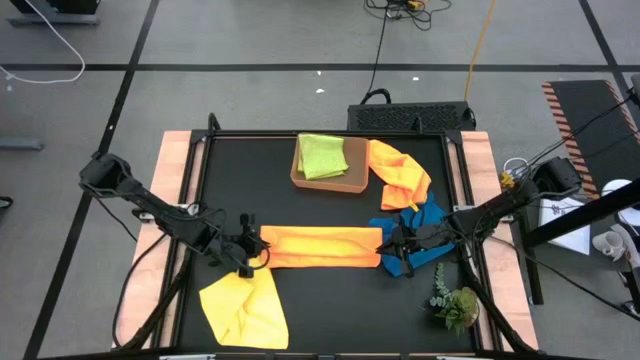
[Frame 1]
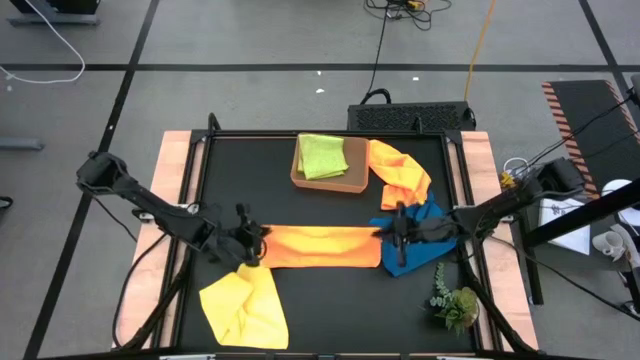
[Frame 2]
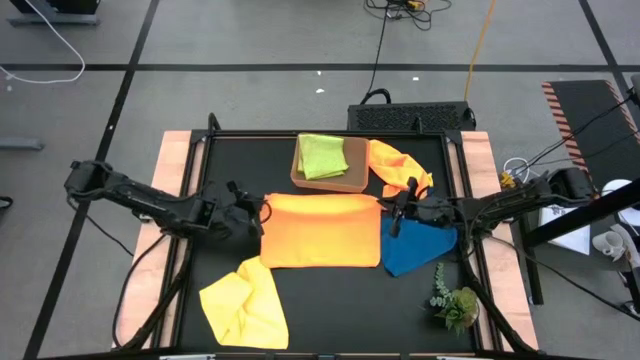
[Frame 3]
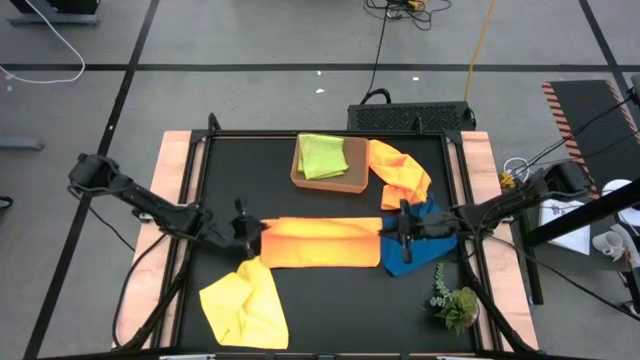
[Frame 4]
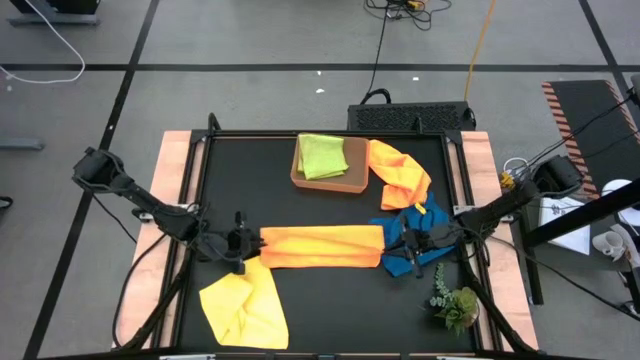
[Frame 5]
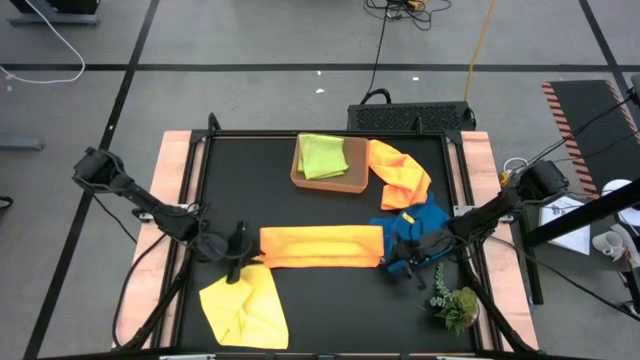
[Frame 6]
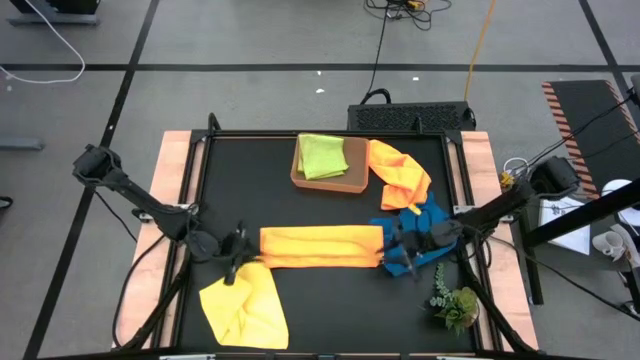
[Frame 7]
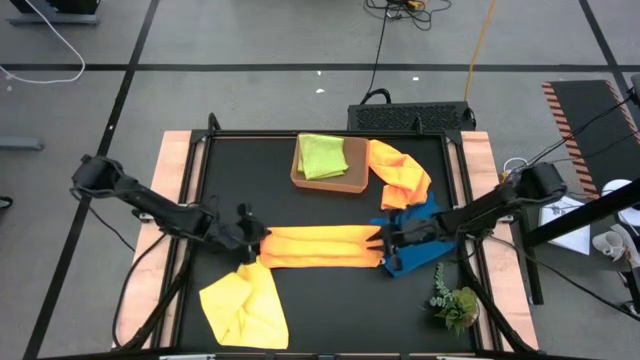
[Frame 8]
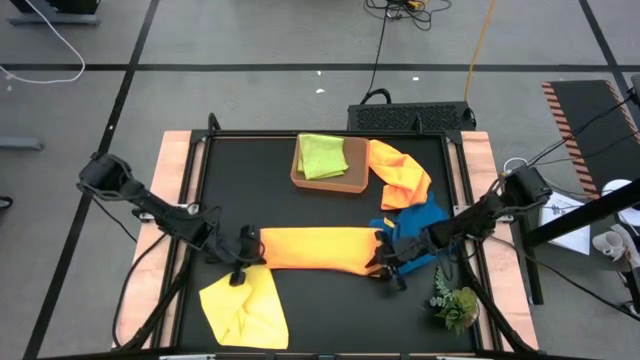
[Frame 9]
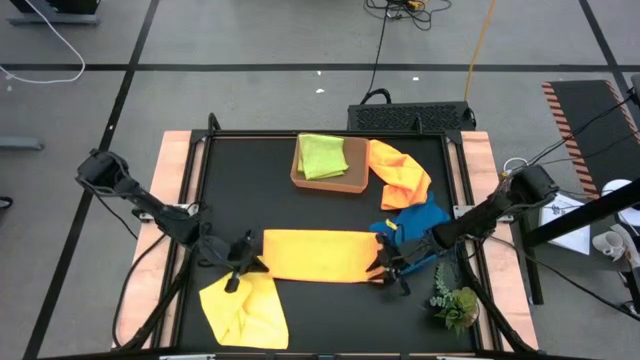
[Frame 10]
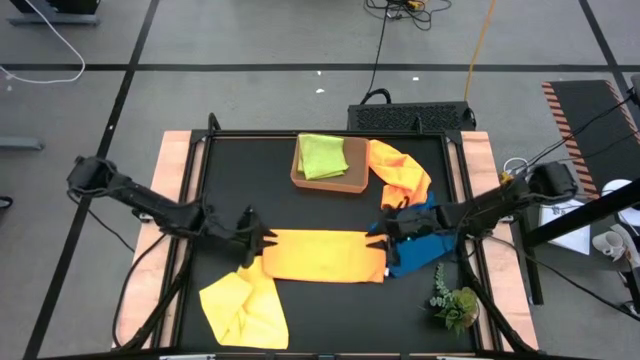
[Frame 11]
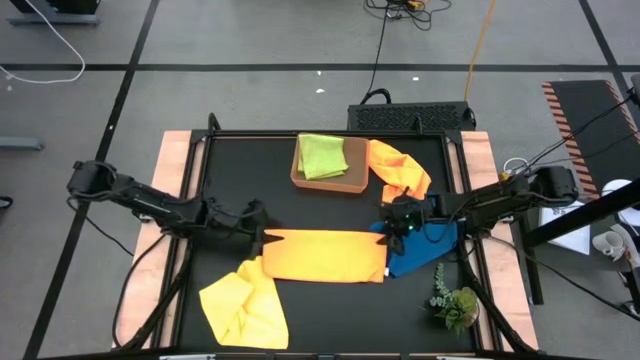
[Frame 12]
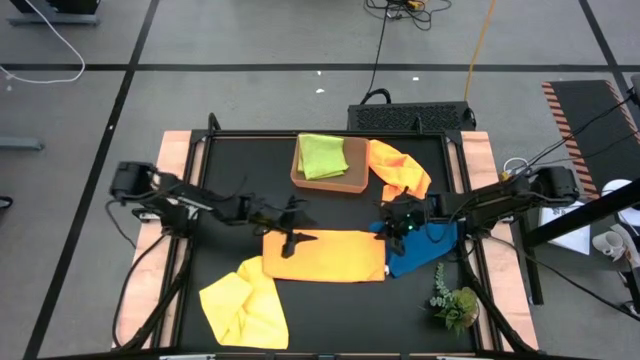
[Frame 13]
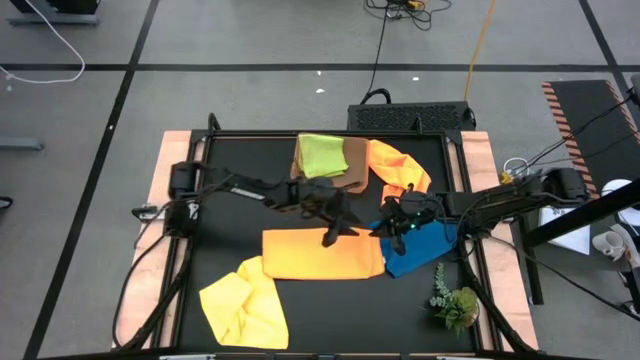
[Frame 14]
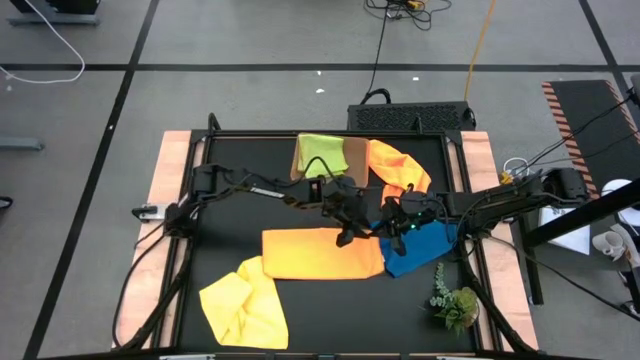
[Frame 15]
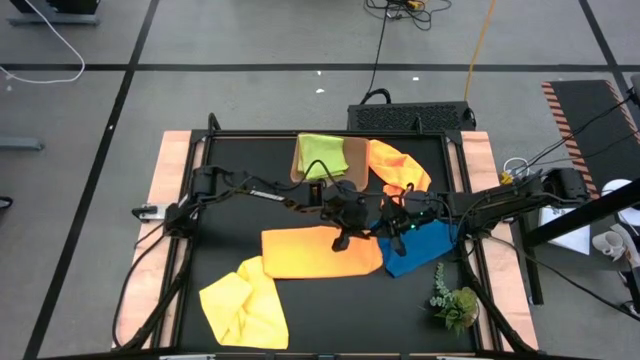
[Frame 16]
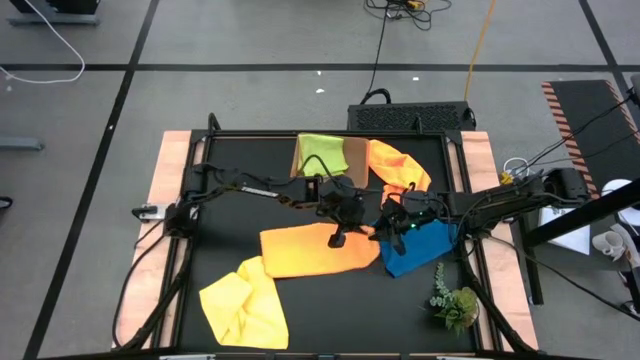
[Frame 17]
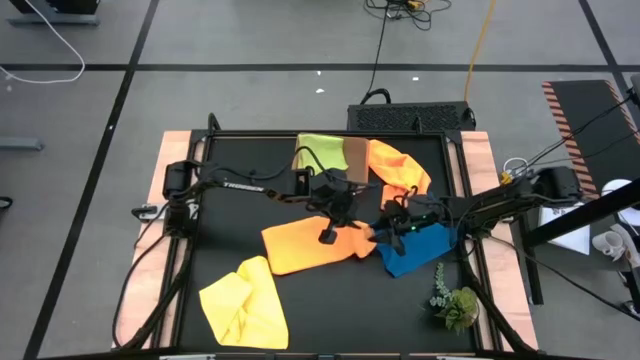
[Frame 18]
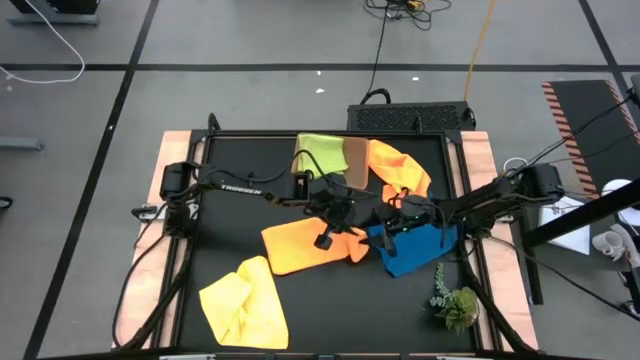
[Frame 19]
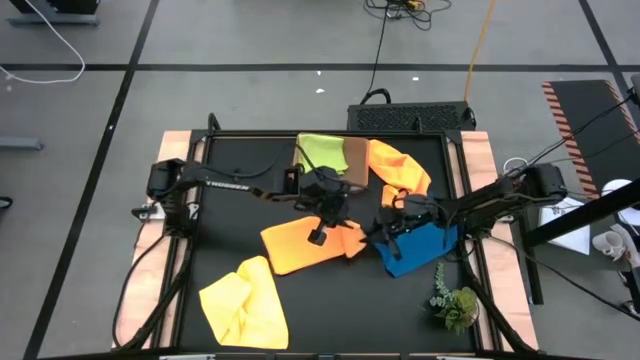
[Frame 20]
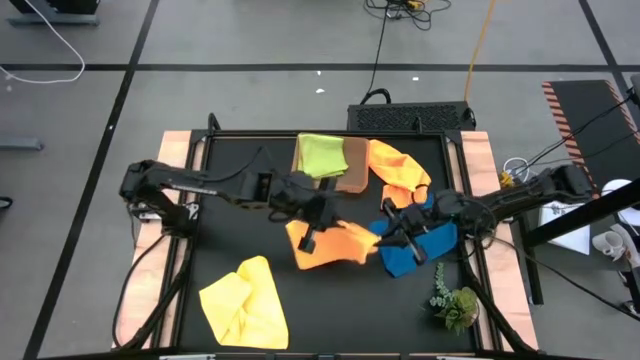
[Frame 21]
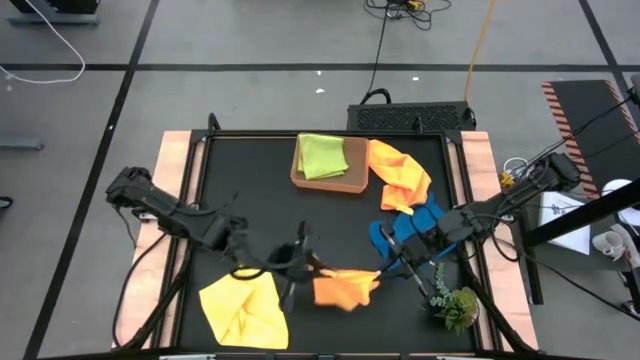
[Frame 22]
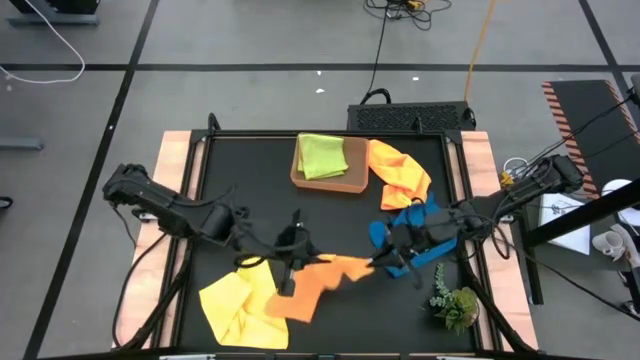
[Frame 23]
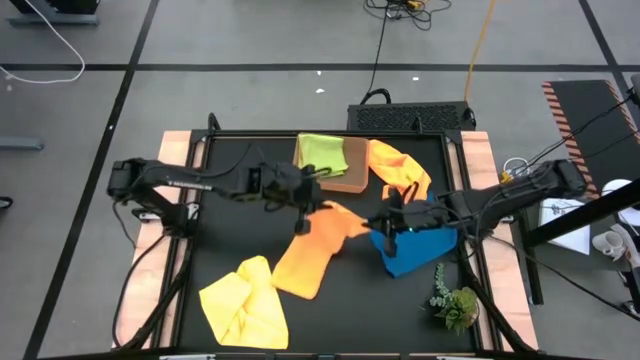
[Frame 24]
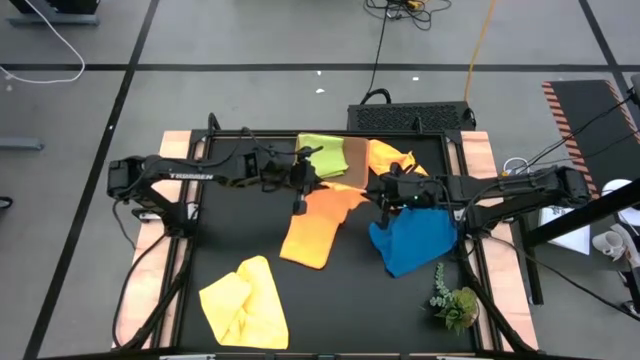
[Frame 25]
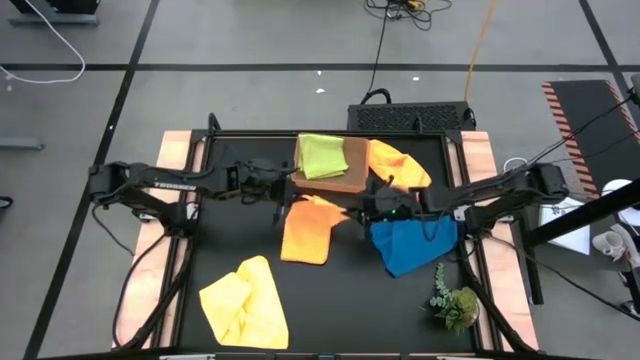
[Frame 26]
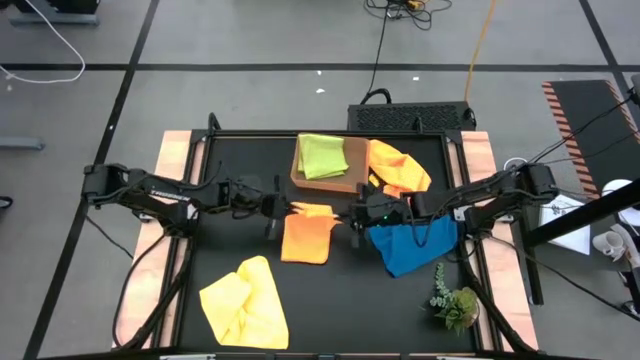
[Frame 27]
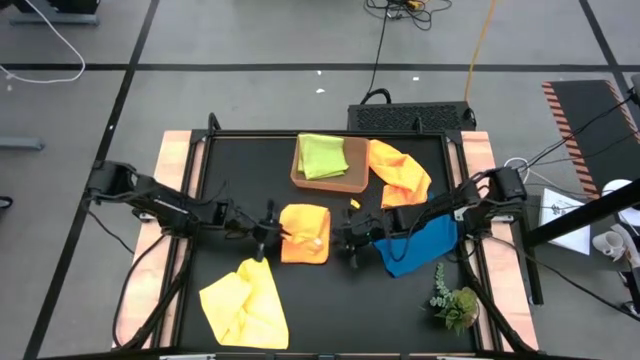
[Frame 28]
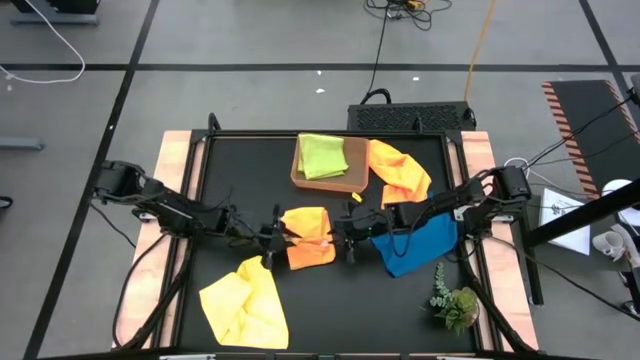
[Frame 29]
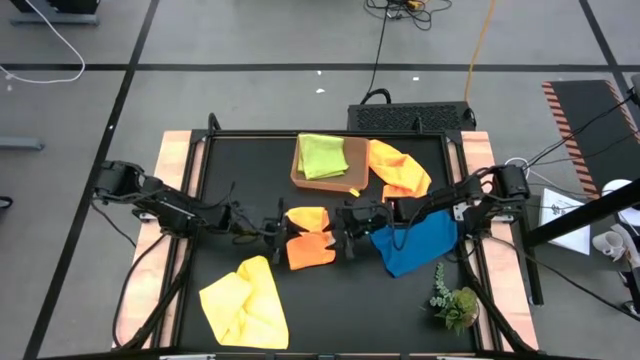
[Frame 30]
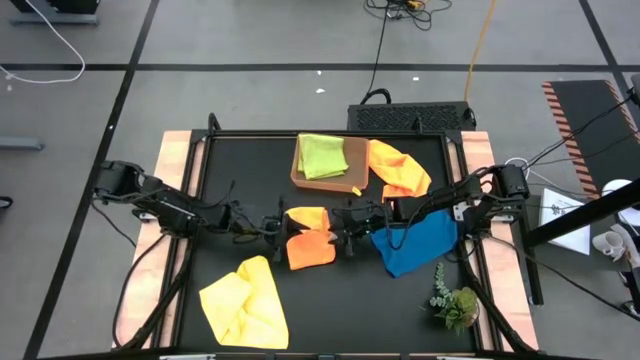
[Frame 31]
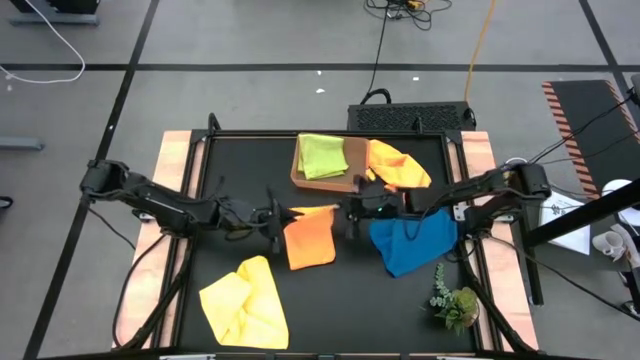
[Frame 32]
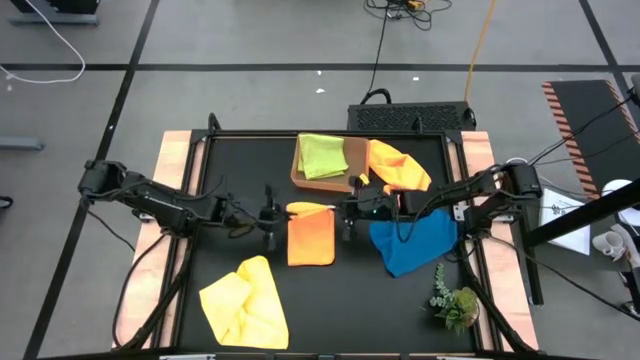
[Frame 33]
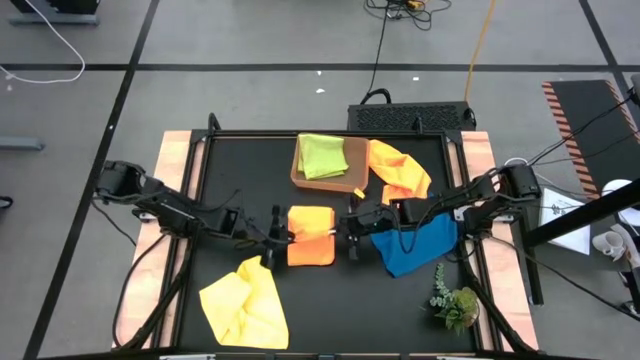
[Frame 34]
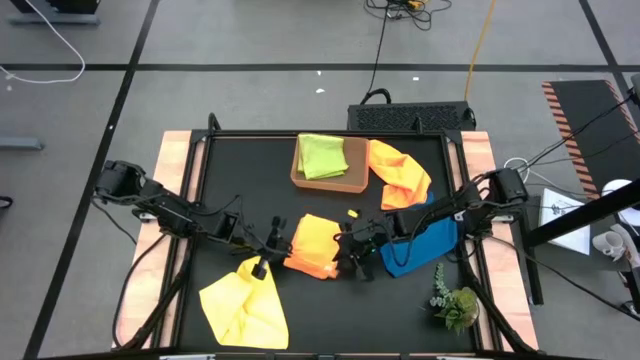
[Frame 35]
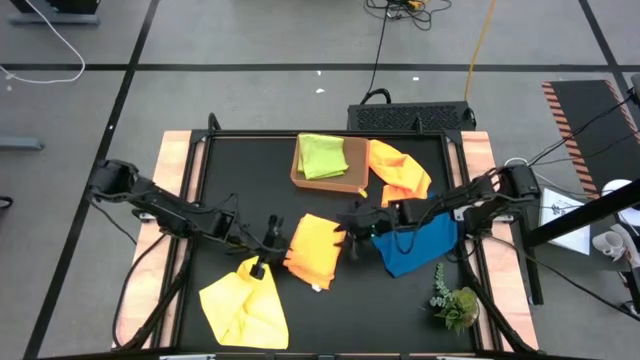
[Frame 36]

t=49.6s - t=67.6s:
Task: Fold microfiber towels
Fold the left orange microfiber cloth

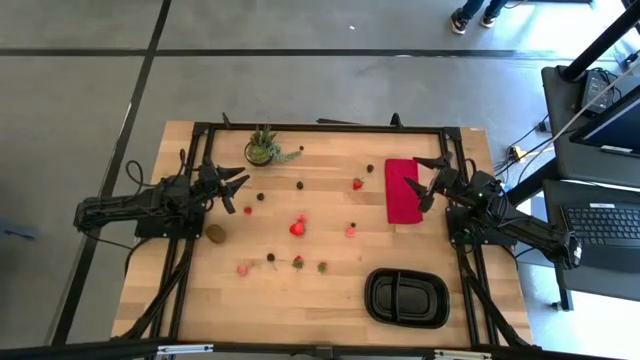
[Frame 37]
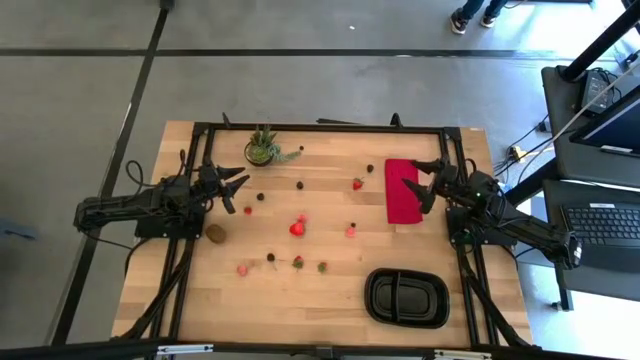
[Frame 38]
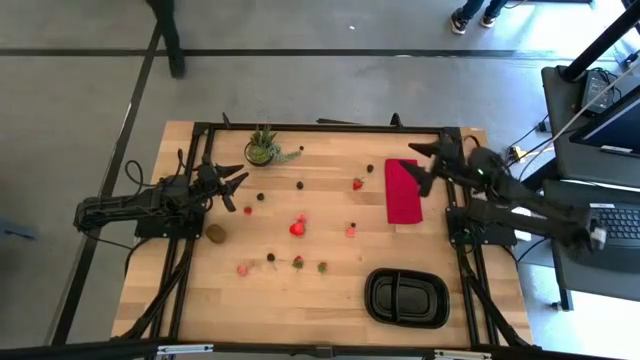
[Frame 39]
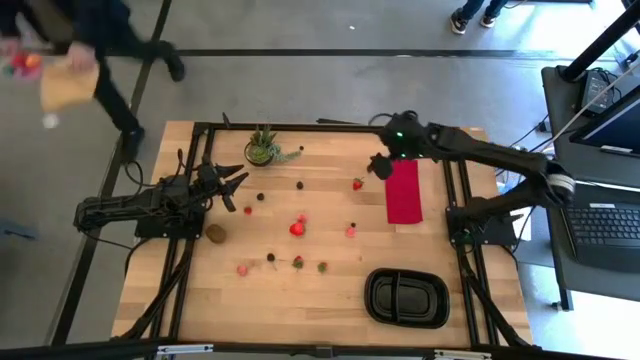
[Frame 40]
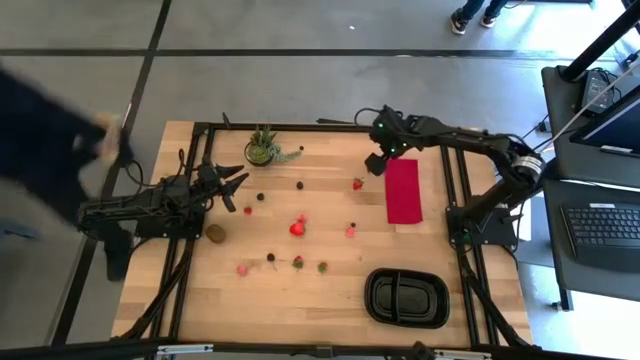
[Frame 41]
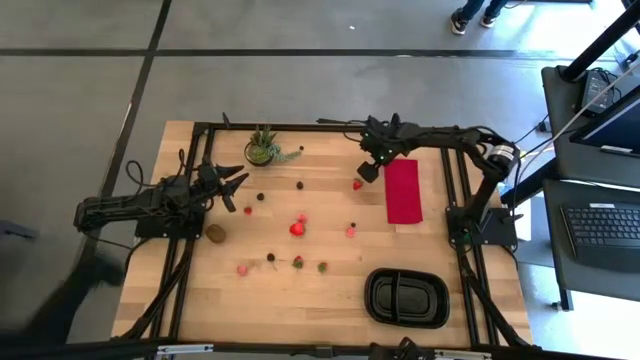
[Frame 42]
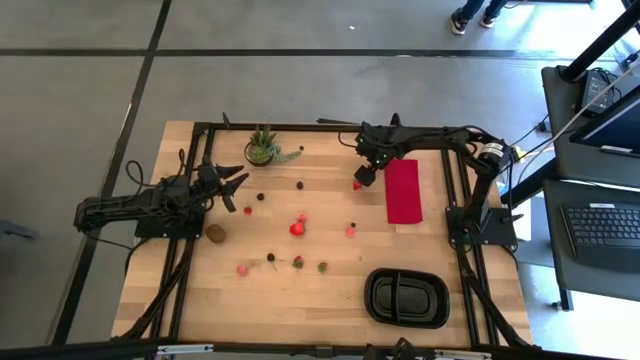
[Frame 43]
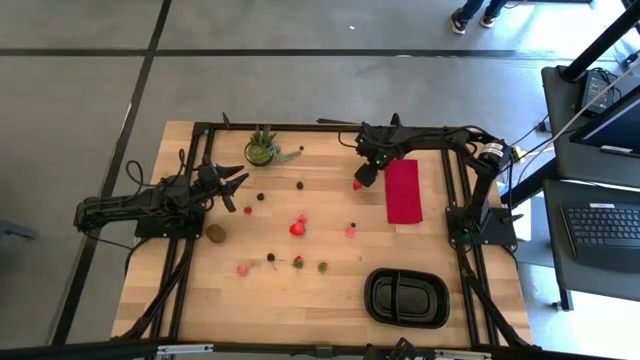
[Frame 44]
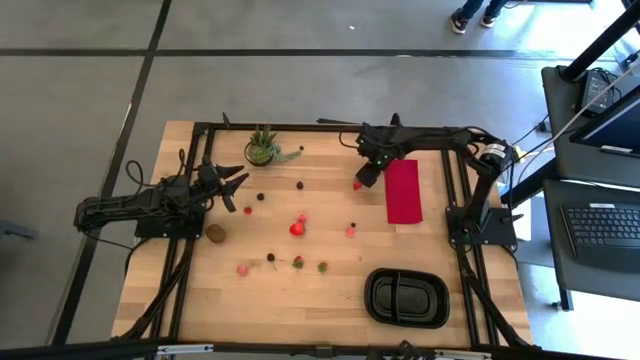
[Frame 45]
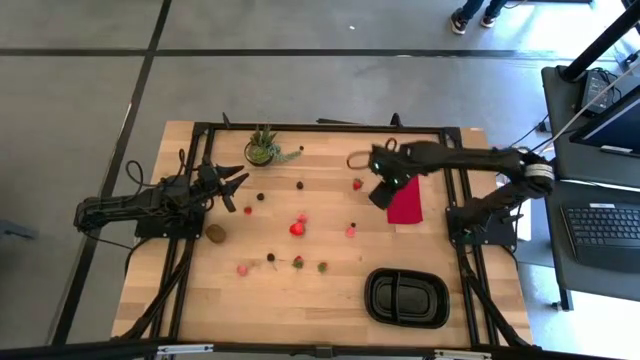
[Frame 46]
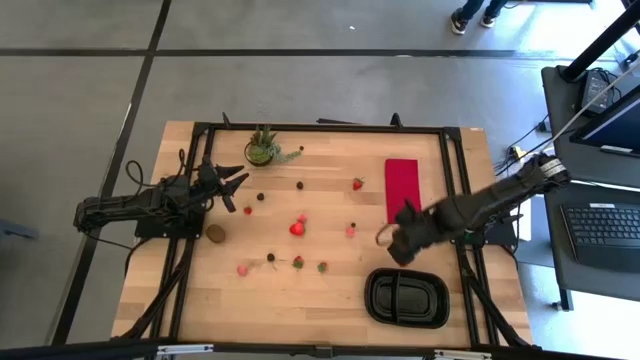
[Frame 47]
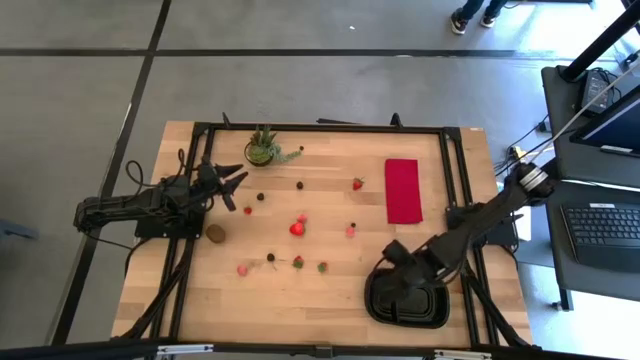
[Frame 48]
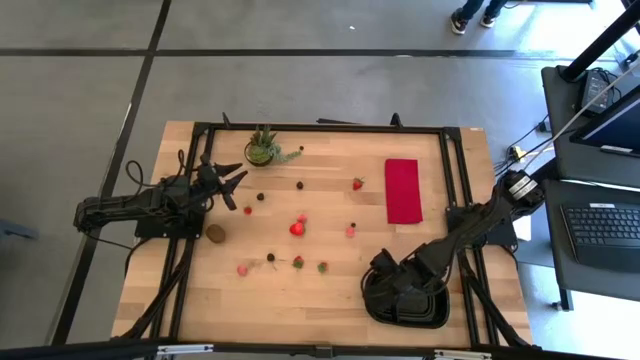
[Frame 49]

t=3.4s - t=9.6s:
Task: Pick and placing Produce into tupperware
Put the blackberry into the left of the black bin
